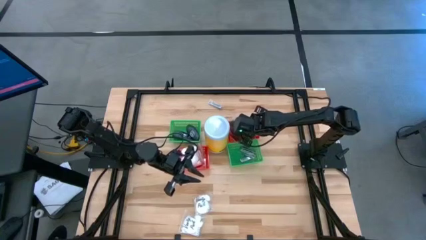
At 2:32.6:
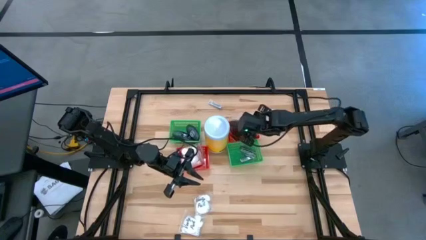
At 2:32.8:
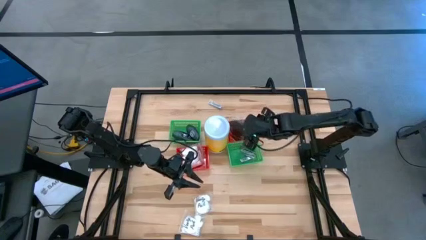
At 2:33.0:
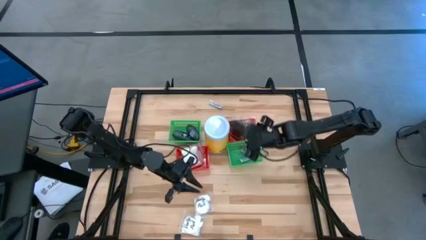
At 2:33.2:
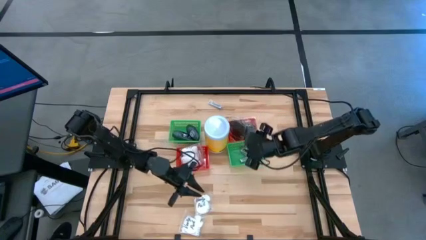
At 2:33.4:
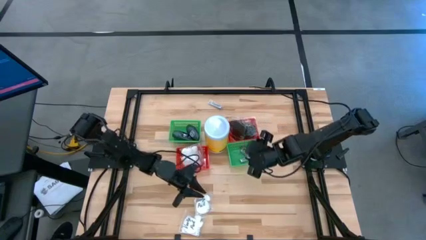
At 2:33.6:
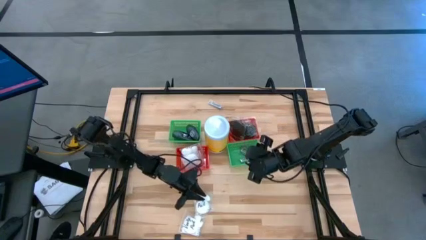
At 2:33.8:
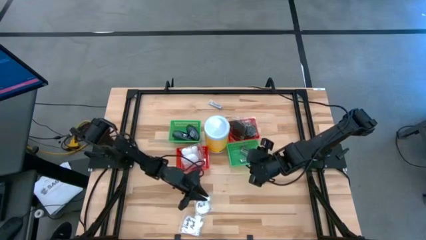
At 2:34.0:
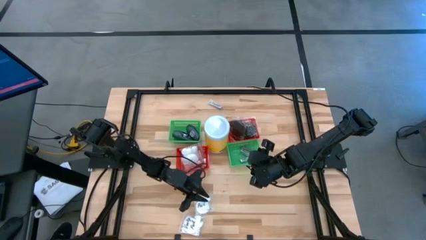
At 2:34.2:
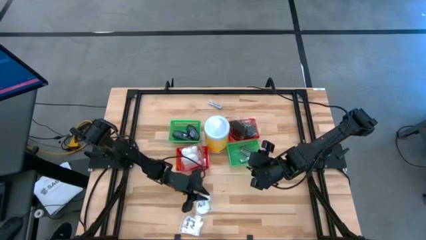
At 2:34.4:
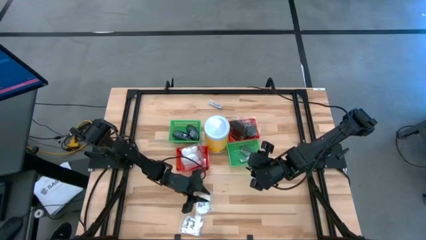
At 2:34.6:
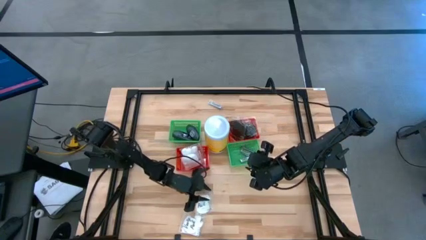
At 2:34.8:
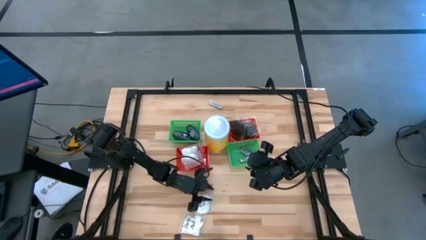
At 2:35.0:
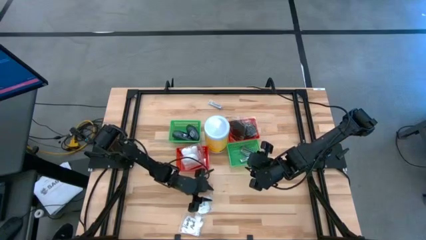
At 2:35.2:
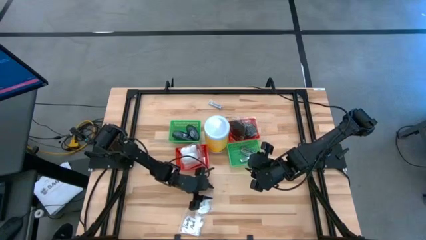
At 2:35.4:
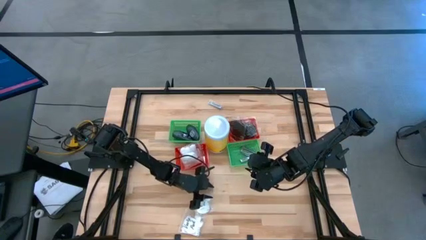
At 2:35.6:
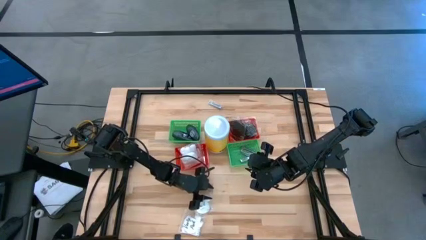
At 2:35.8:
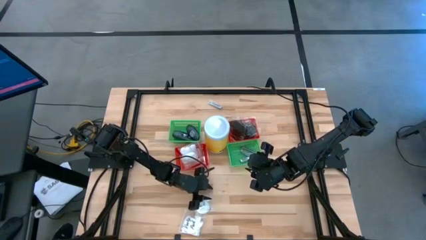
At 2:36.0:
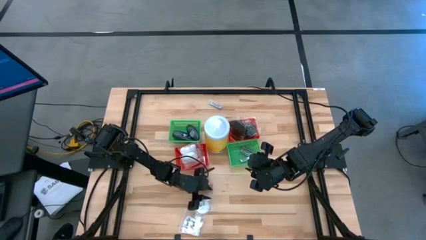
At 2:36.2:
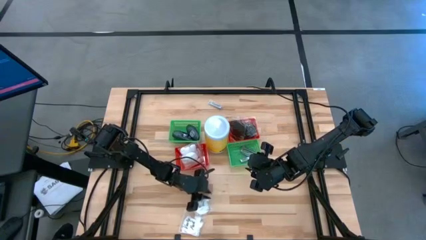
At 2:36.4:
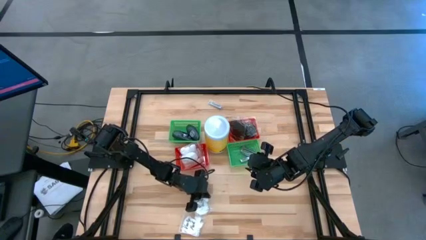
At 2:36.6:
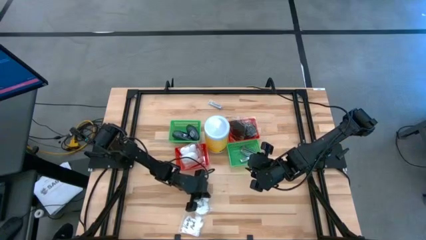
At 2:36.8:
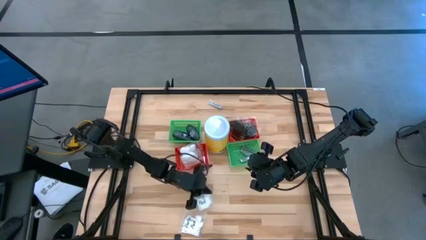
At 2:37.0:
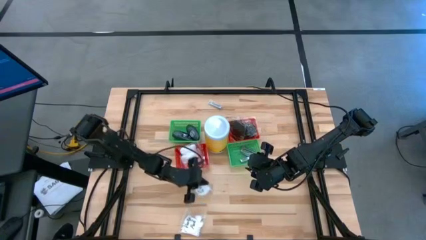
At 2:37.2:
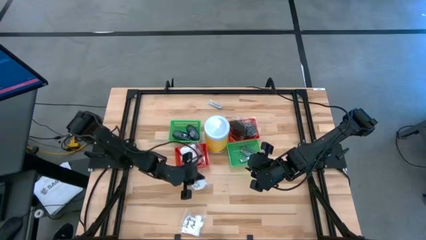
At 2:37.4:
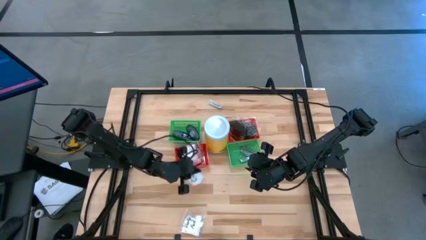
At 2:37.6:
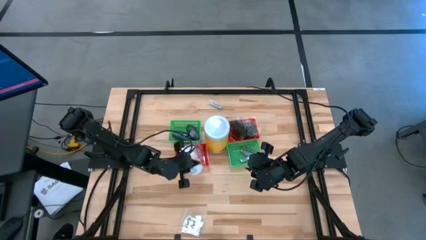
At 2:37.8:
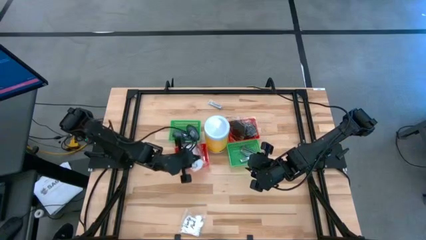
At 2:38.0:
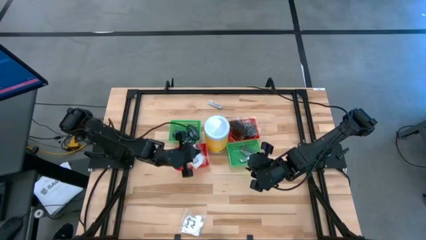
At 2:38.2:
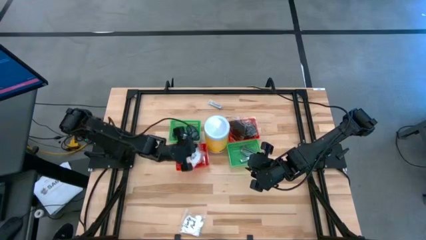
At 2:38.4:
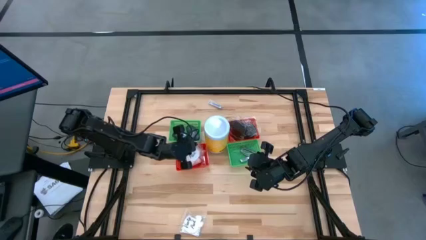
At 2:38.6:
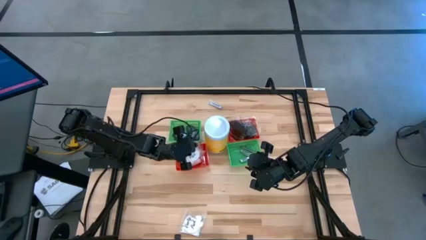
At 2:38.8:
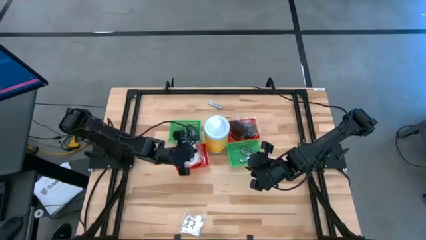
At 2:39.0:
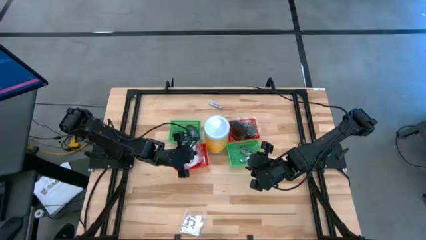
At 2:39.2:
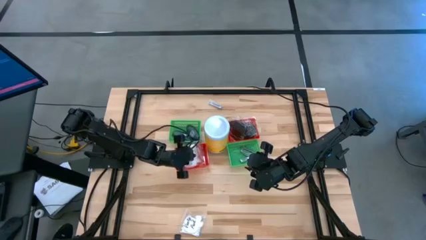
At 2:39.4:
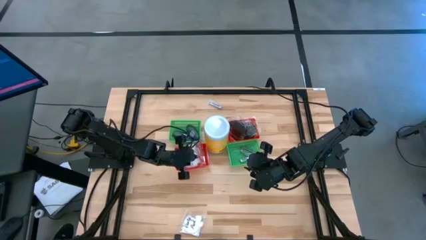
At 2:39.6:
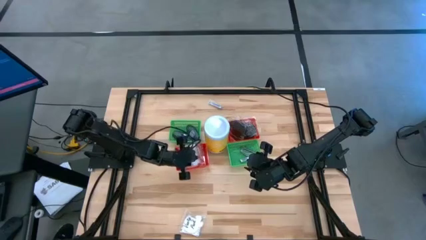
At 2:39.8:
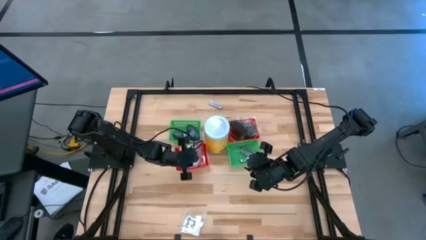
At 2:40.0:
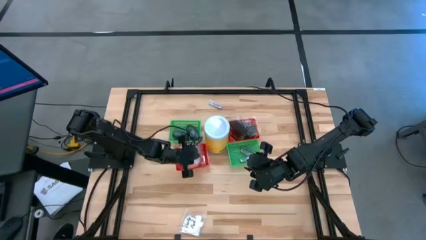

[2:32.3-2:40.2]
Task: Pick & Place Travel size toiletries
Put the transparent cotton pack into the left red bin

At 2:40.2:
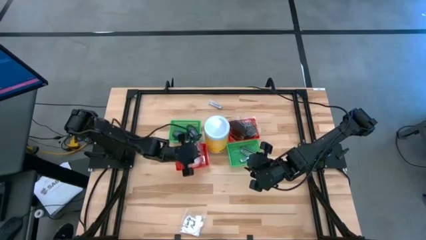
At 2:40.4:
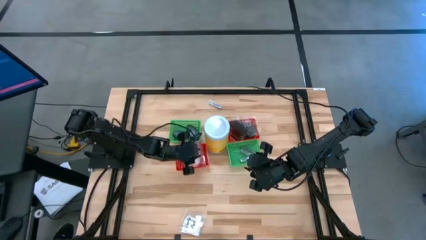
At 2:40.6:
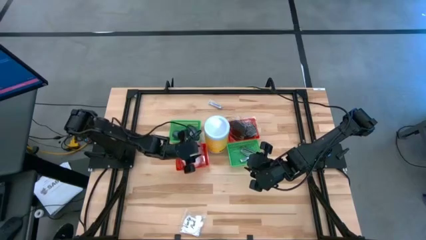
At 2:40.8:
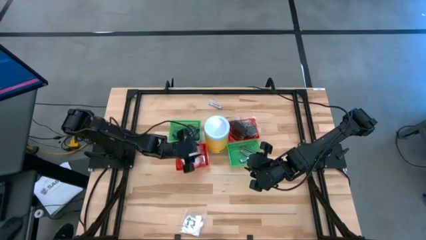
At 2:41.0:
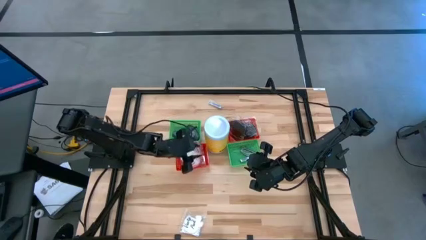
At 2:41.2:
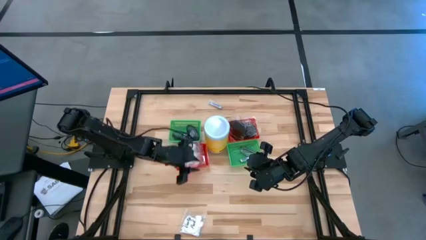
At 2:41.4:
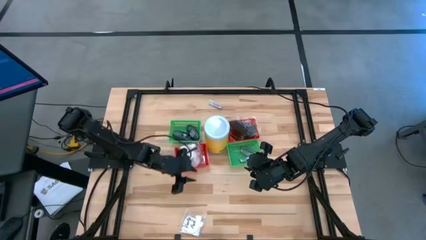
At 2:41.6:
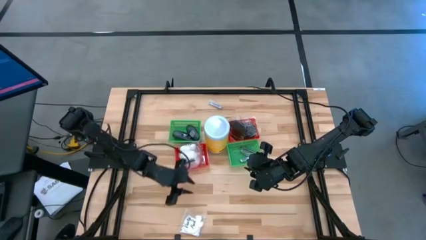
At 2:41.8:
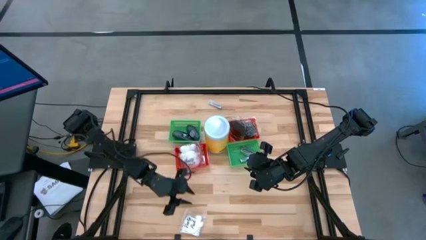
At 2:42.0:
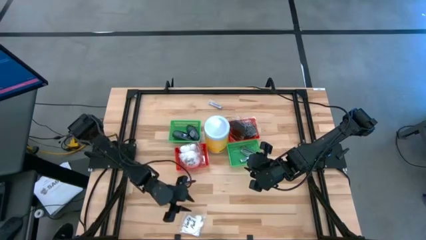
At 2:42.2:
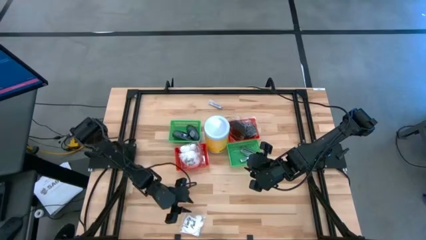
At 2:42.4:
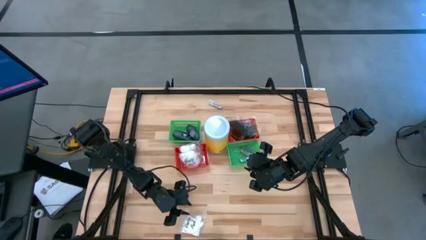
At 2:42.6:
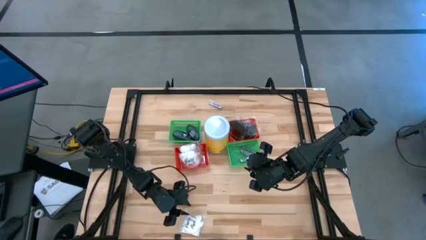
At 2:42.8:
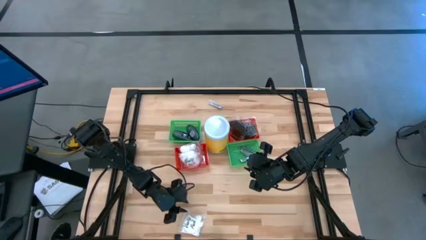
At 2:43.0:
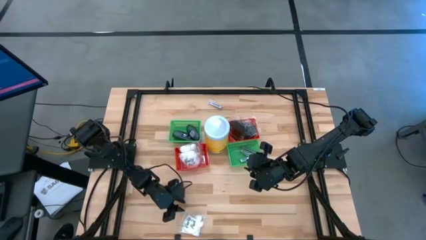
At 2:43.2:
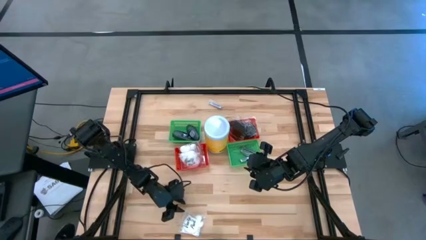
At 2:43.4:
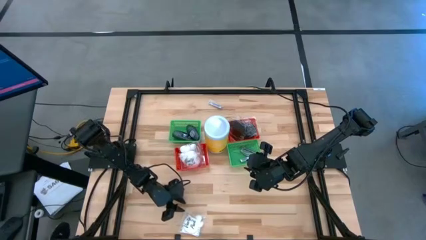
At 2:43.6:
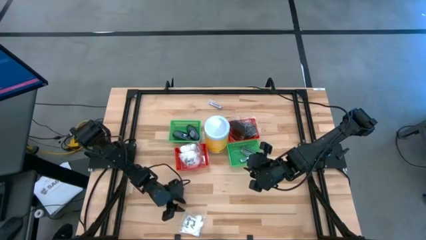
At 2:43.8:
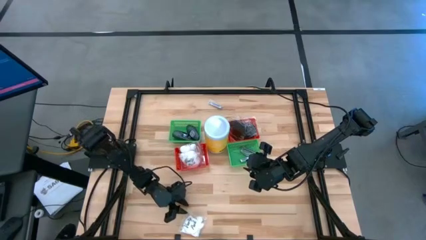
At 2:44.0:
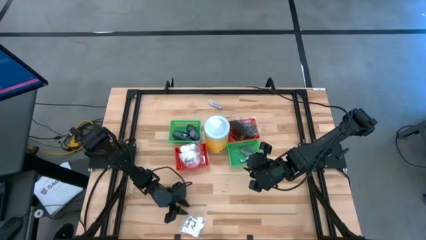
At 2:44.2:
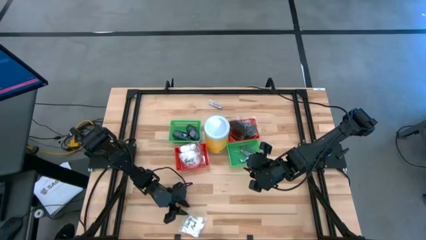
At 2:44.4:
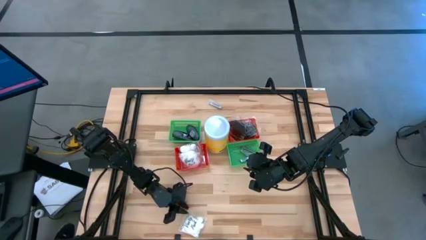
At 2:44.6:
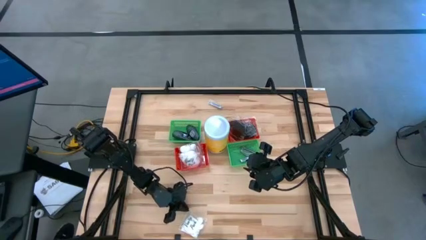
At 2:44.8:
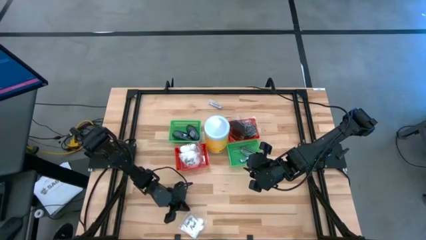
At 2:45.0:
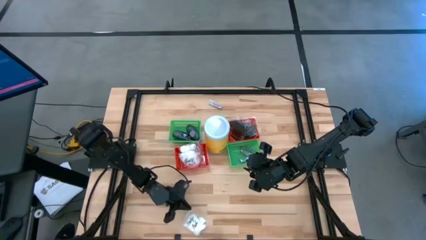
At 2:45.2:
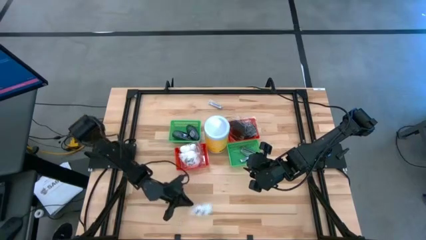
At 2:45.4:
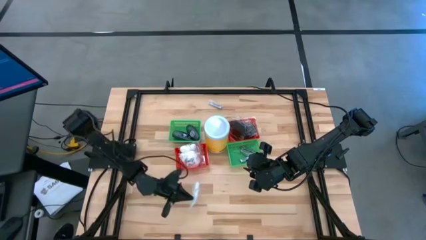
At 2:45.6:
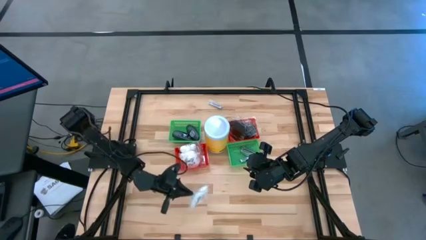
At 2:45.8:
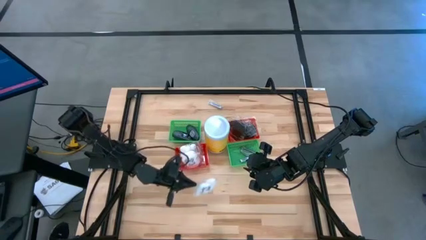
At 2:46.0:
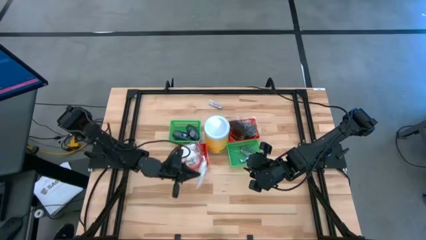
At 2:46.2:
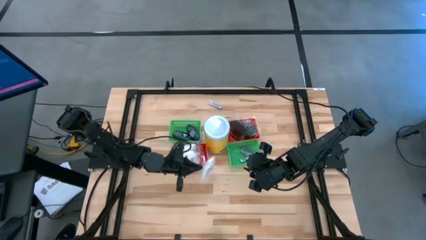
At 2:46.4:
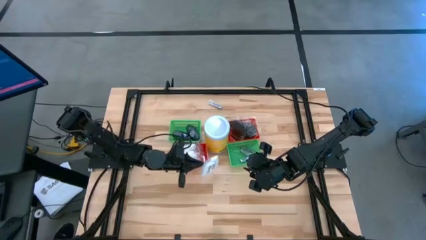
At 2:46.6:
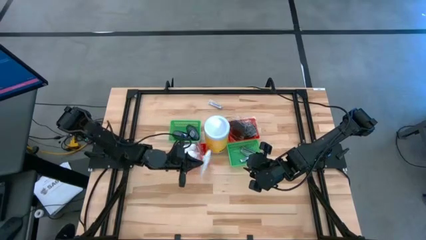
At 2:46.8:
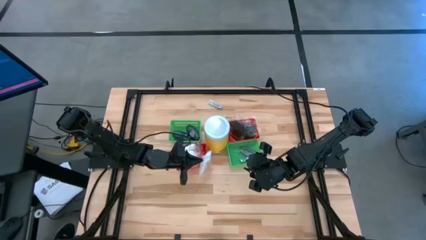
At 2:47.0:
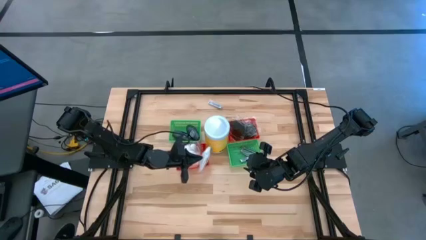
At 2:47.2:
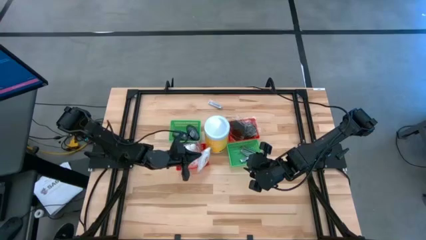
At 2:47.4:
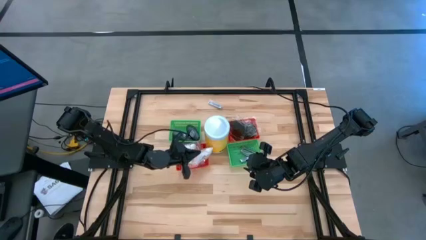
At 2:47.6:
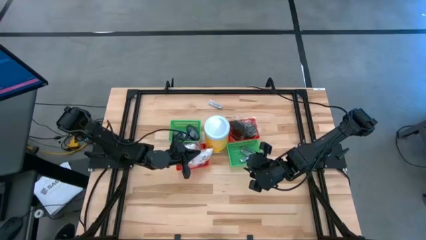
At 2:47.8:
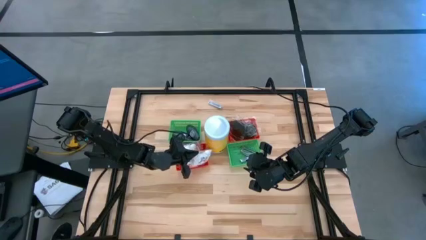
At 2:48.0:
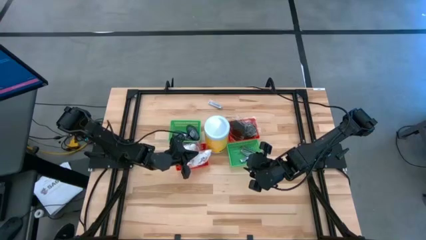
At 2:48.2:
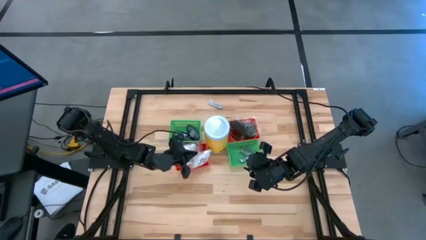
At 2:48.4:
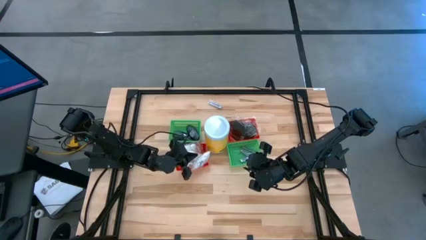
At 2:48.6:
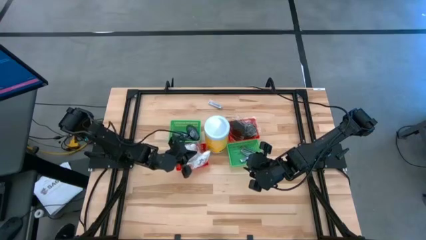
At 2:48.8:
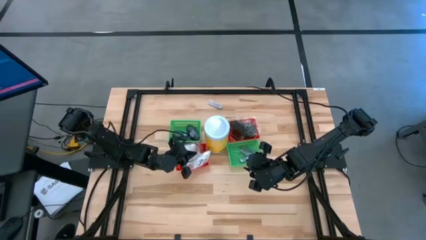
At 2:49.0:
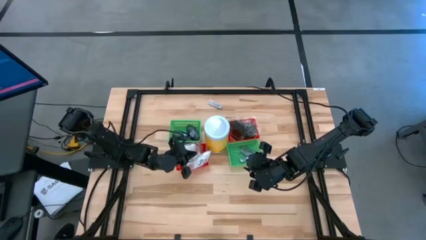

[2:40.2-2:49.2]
Put the transparent cotton pack into the left red bin
